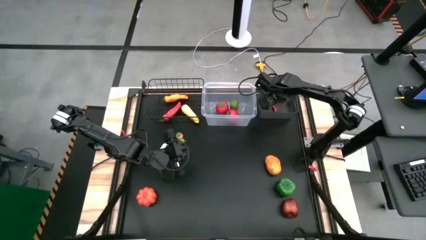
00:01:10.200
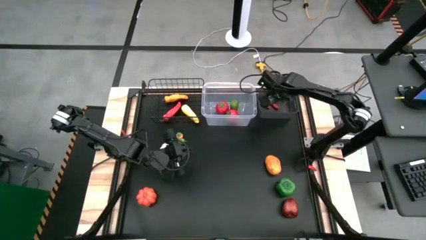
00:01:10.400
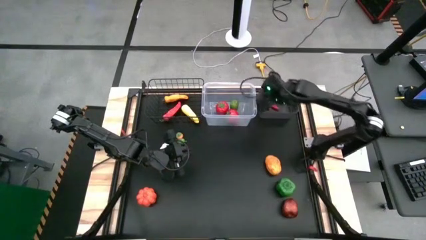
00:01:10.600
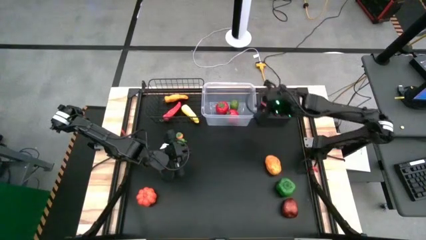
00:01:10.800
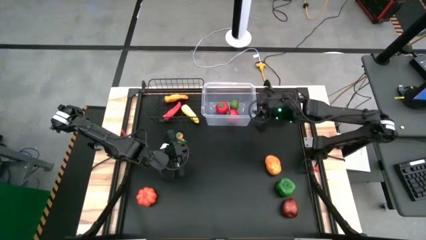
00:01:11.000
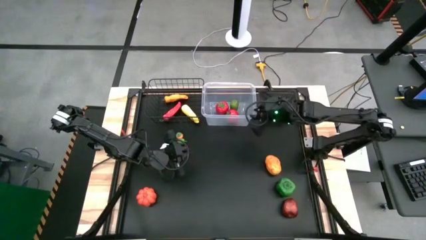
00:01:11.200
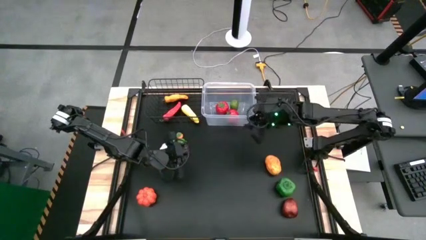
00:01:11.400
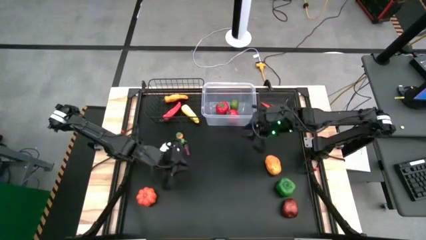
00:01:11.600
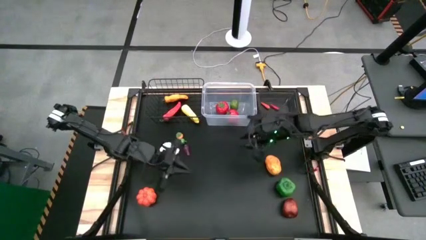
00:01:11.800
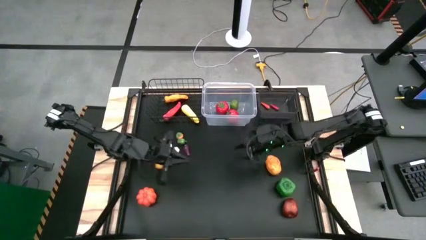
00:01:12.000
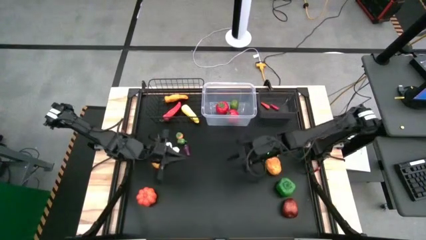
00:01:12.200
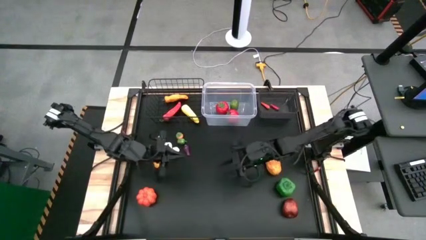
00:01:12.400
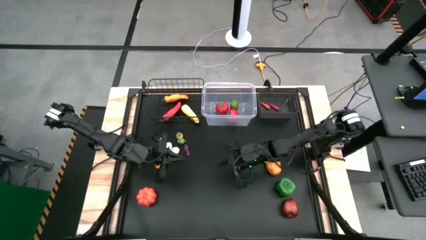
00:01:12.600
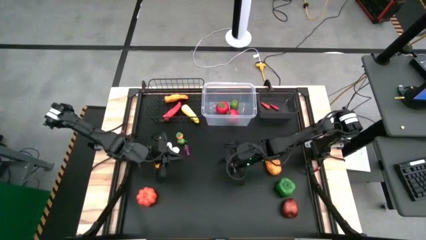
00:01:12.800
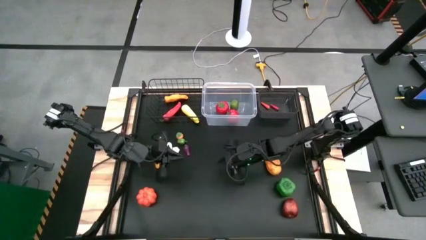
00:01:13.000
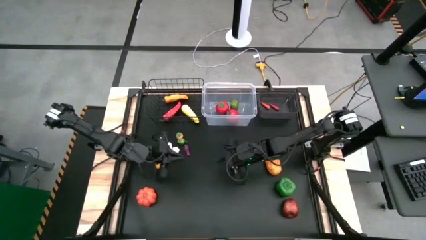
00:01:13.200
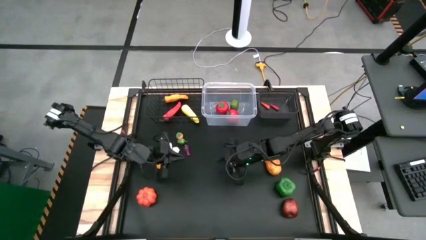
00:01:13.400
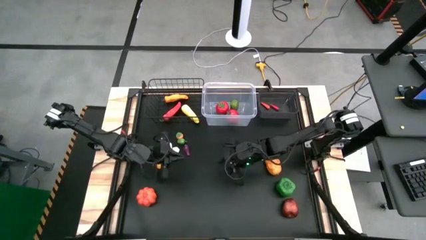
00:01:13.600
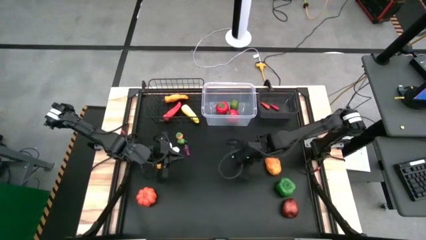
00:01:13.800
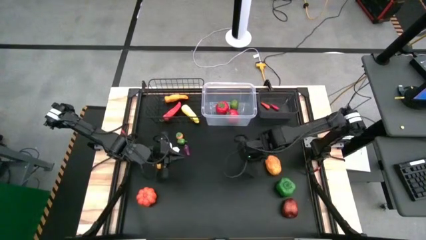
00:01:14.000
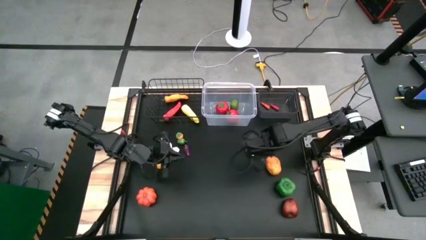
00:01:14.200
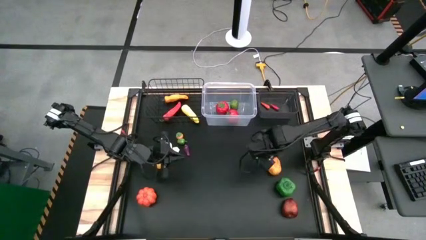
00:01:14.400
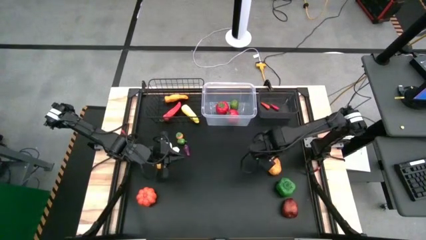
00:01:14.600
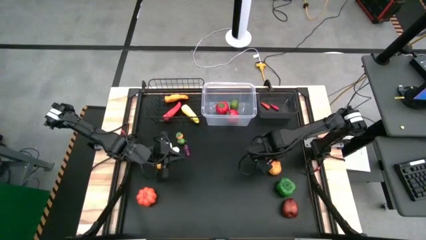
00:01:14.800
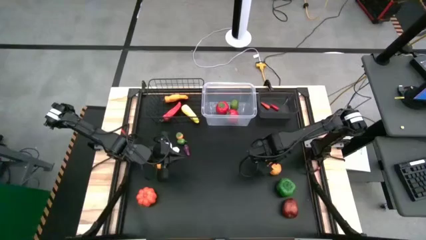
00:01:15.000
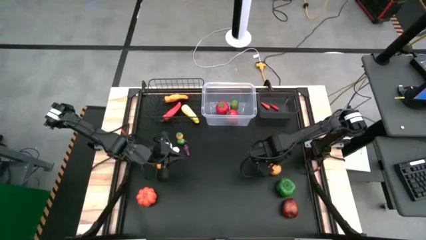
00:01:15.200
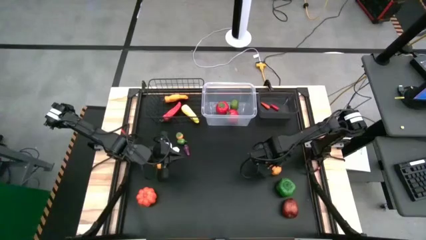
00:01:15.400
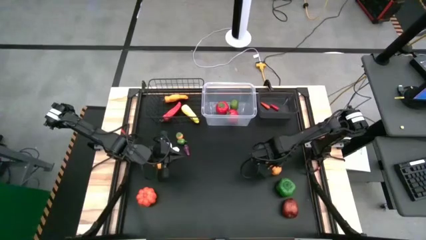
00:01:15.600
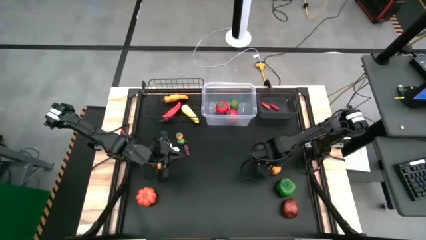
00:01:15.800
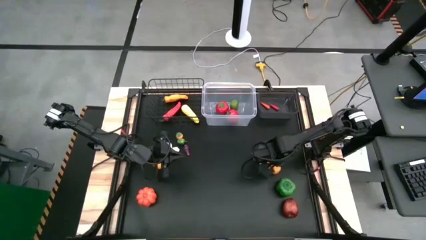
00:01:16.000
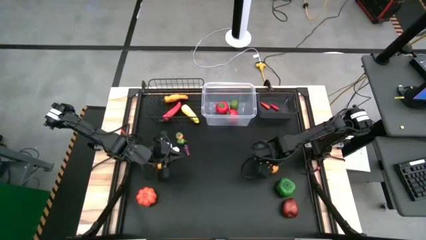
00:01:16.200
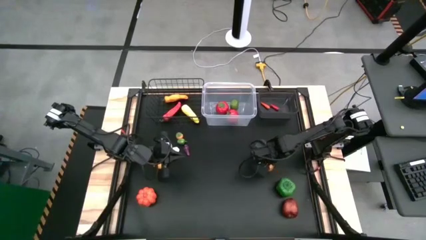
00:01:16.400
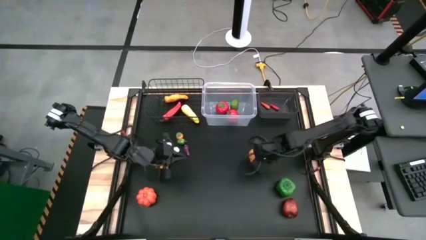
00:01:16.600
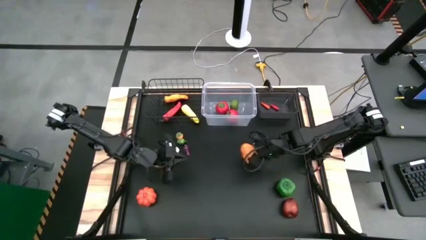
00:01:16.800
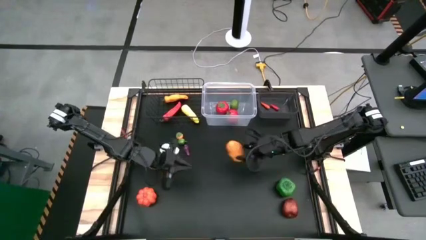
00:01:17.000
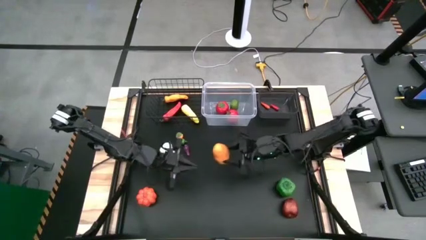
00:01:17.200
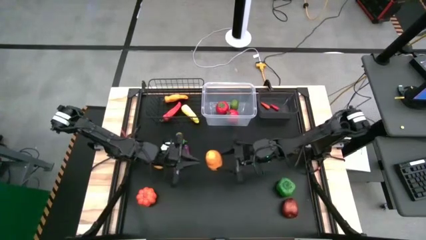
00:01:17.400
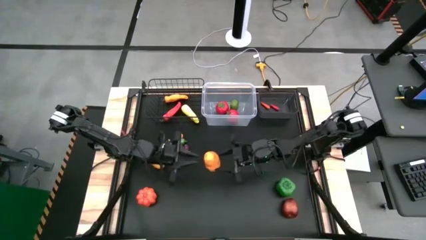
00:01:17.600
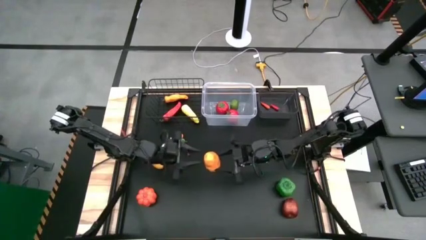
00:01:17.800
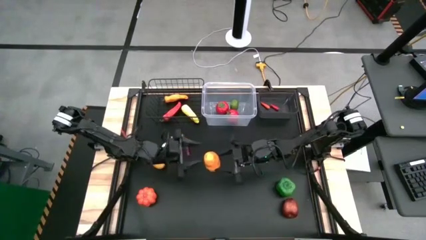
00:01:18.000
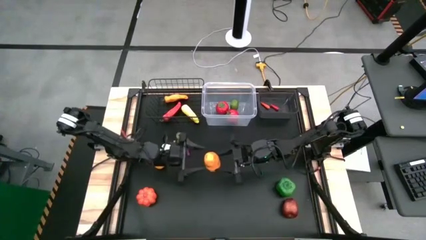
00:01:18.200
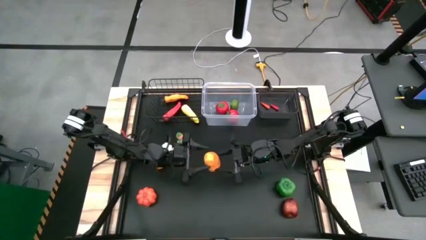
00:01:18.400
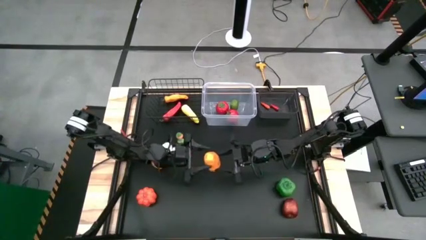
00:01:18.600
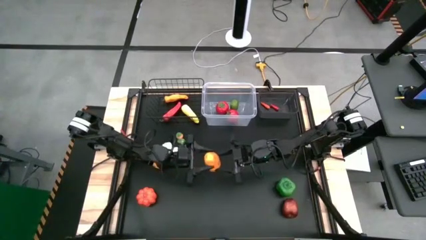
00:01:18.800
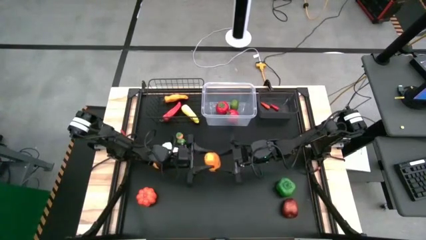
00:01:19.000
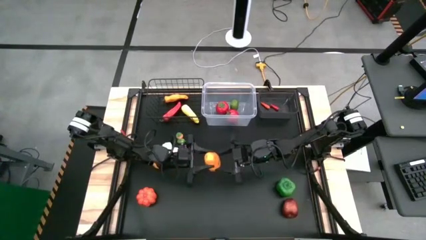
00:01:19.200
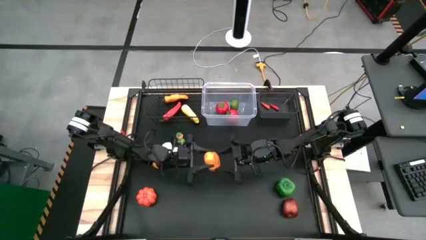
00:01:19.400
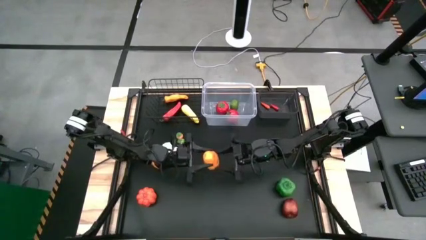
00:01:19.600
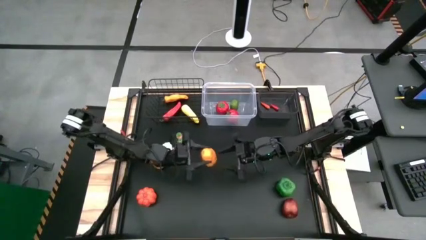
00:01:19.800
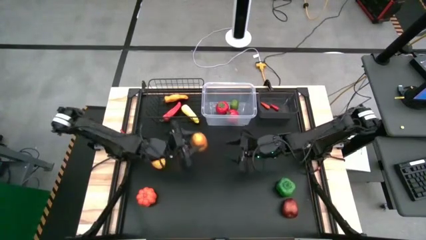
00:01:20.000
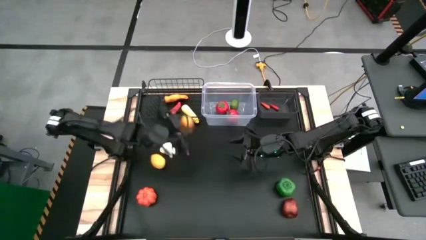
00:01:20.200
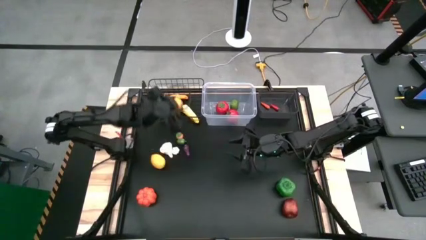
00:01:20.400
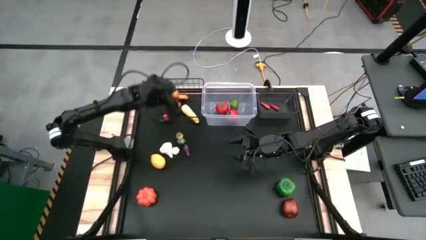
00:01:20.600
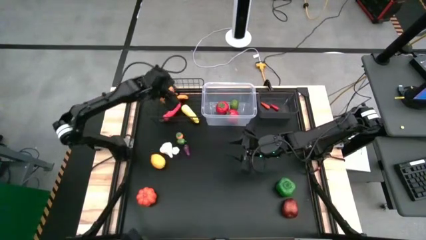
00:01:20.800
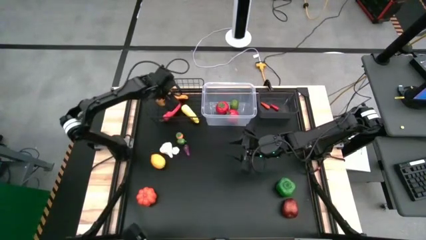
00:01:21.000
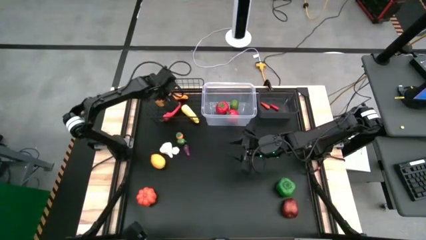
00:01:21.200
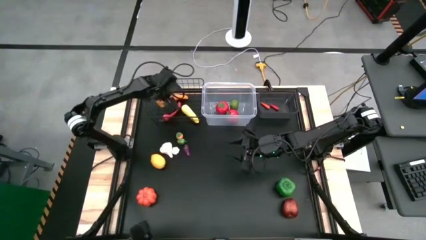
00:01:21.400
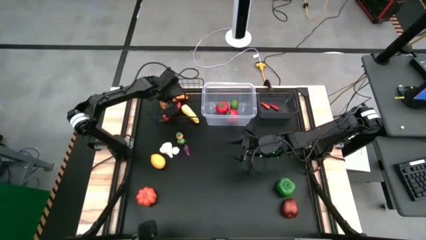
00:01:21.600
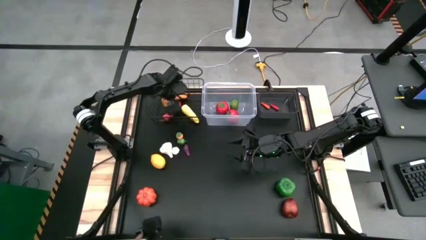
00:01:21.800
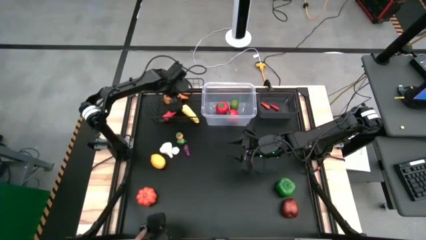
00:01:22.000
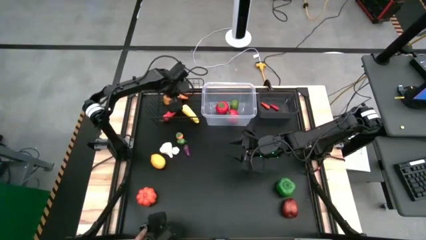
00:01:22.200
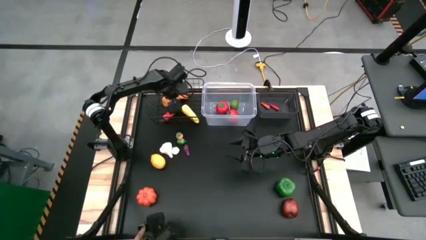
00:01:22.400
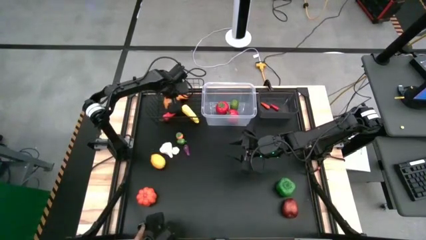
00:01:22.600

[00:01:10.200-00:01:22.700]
Task: Sort produce into baskets
Put the potato into the wire basket

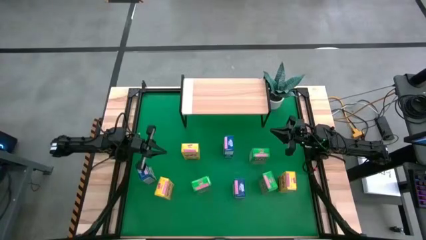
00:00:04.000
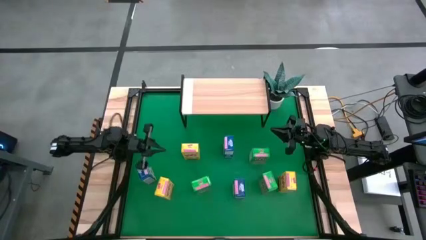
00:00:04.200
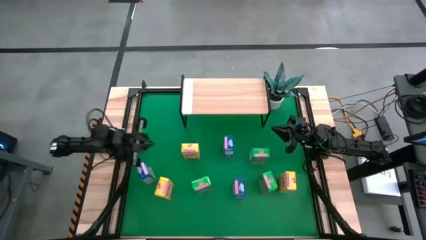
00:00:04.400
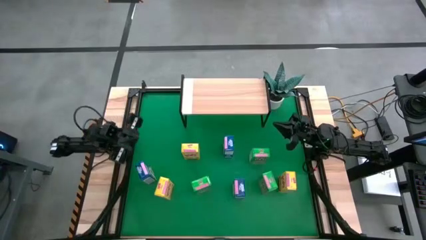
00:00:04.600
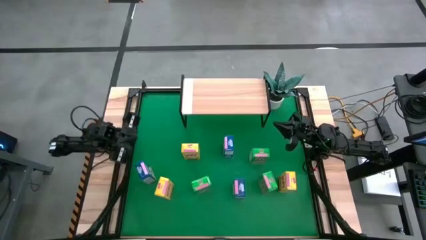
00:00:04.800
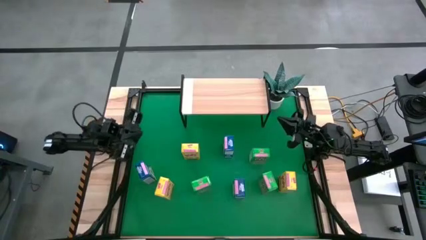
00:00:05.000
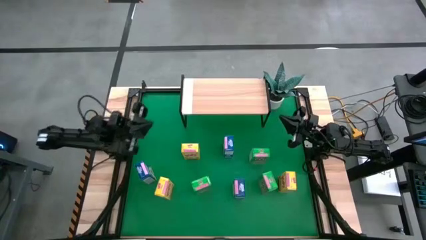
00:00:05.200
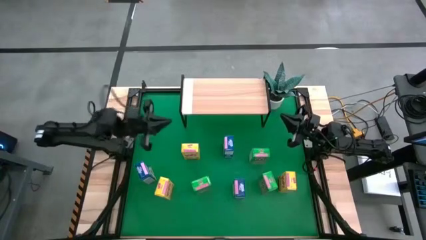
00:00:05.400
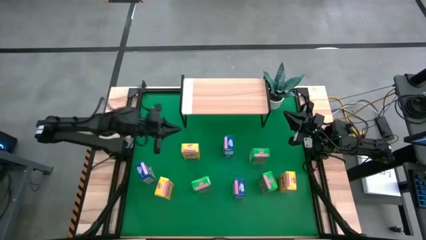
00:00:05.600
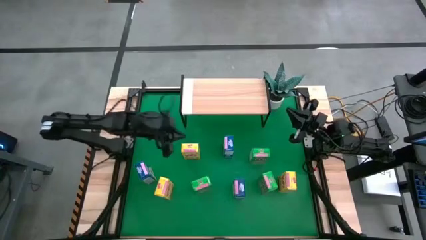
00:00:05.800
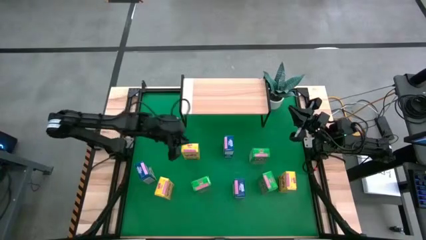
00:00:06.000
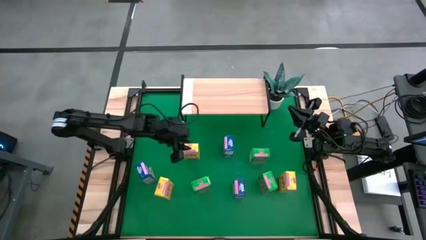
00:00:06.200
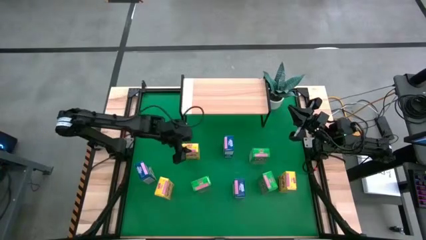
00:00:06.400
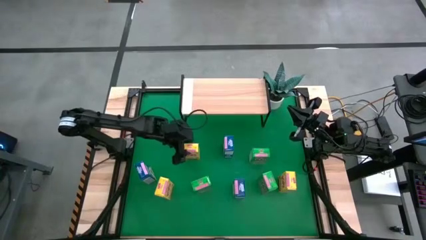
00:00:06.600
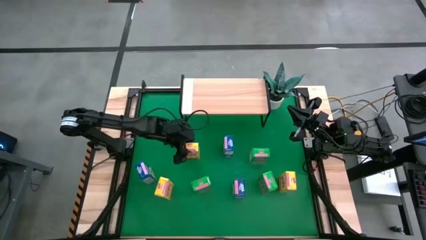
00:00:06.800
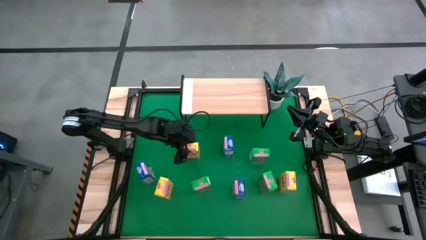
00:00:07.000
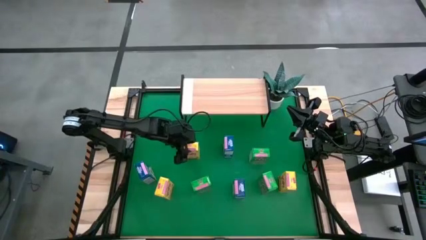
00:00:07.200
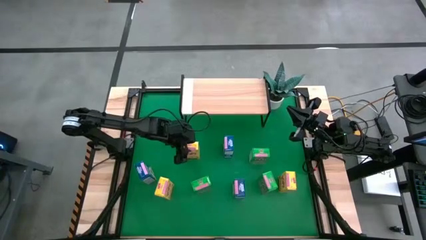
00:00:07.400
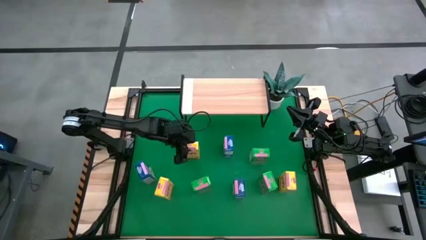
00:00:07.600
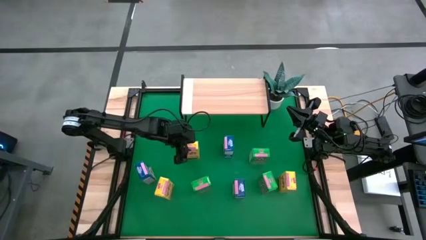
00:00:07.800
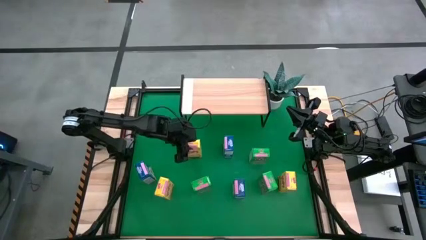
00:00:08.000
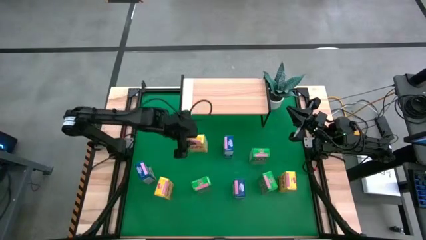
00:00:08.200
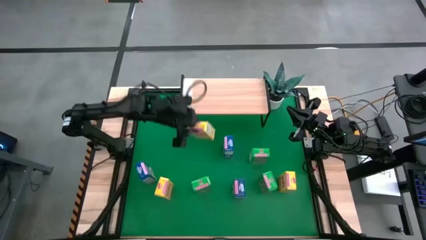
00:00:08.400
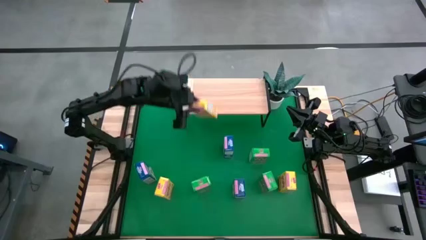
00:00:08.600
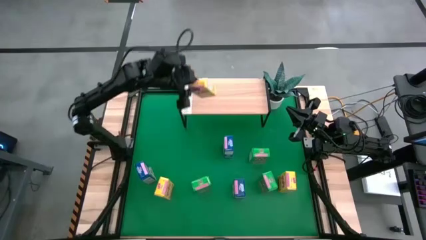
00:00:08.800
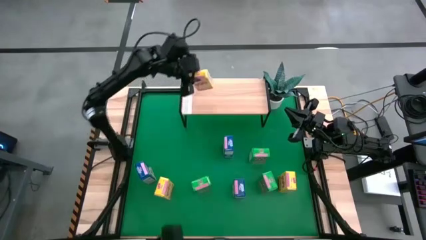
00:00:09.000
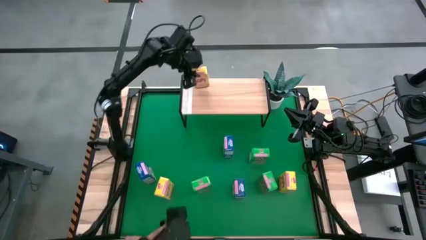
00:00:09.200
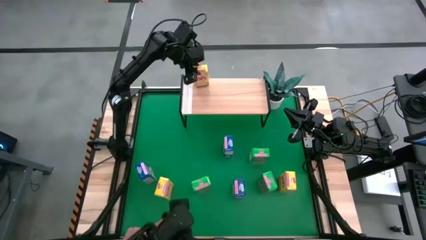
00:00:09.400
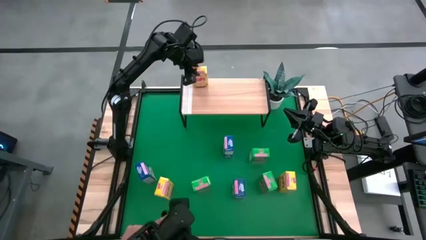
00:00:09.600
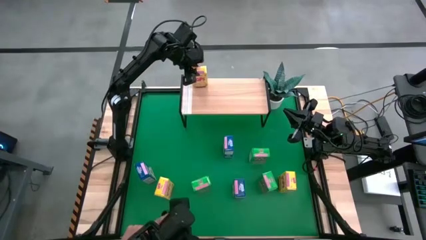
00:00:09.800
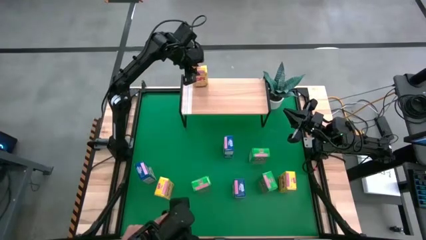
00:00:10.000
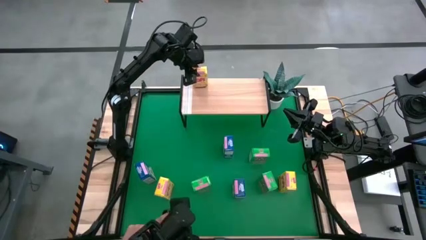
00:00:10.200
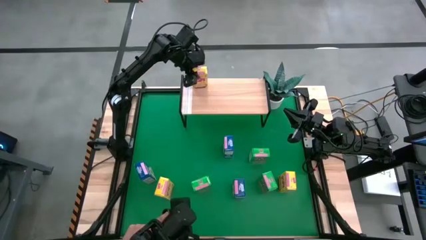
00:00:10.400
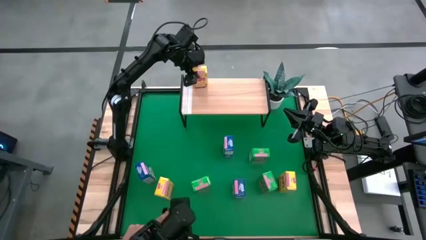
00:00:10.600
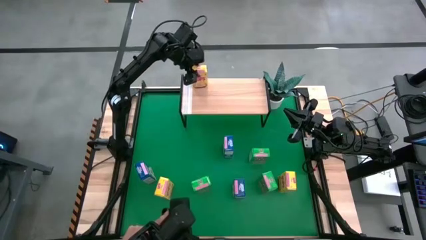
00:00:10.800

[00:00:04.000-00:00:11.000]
Task: Stack cereal on shelf
Put the top yellow cereal box on the shelf
